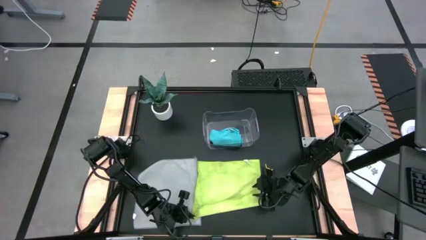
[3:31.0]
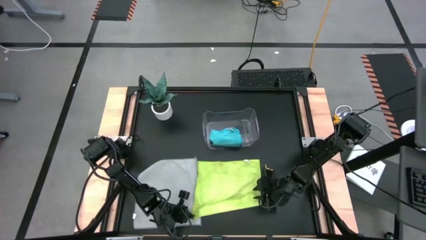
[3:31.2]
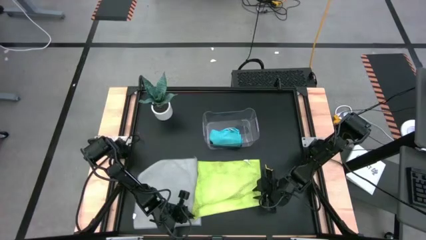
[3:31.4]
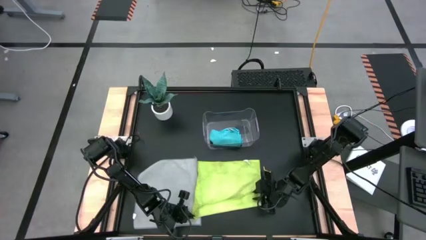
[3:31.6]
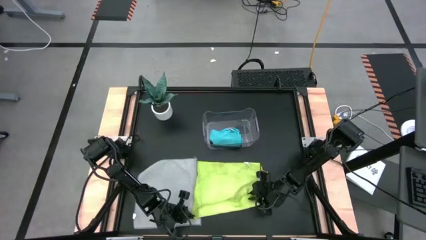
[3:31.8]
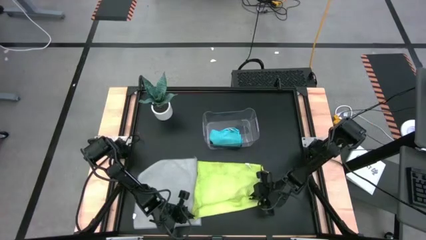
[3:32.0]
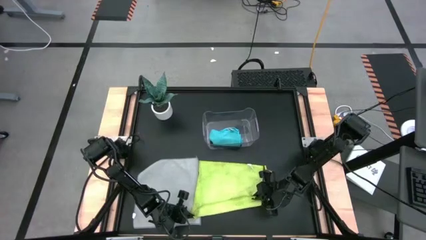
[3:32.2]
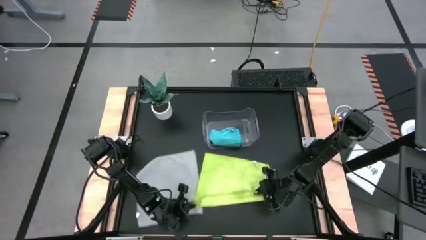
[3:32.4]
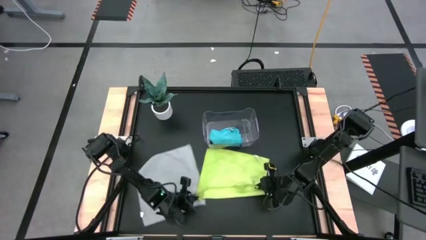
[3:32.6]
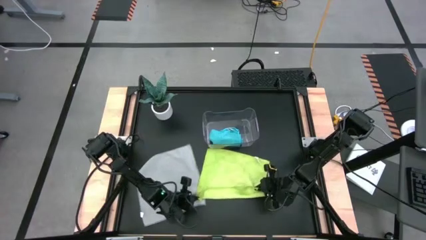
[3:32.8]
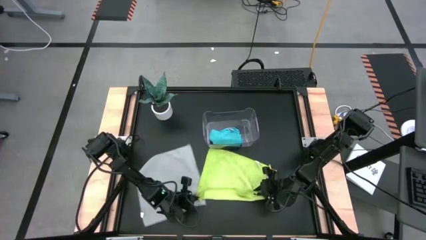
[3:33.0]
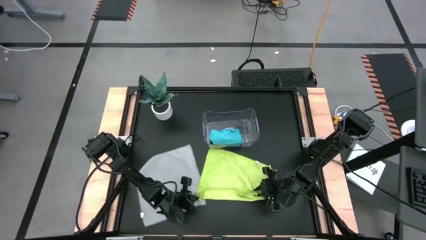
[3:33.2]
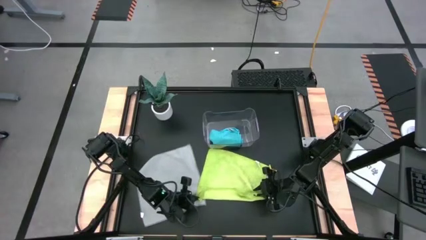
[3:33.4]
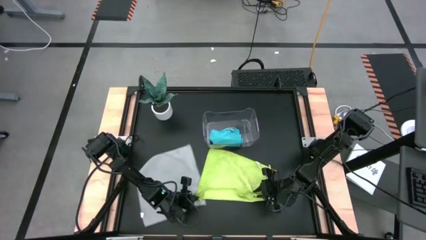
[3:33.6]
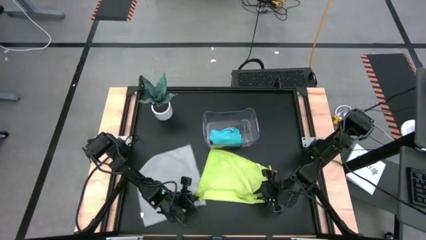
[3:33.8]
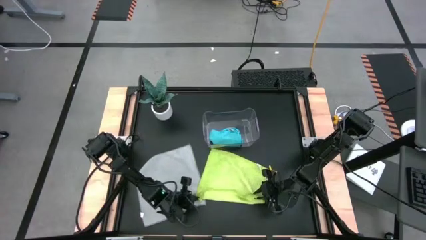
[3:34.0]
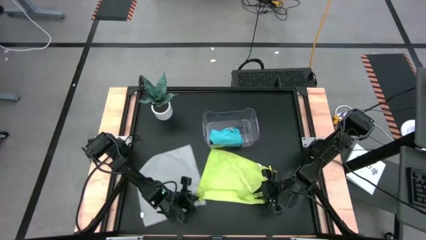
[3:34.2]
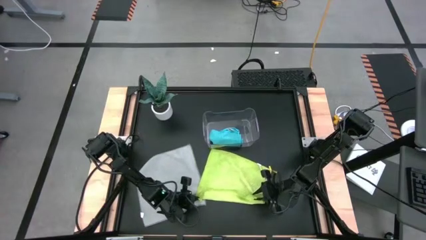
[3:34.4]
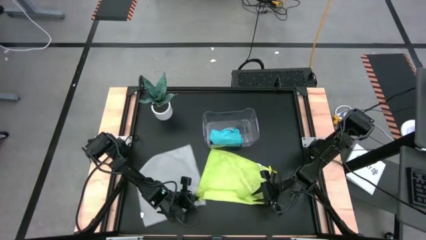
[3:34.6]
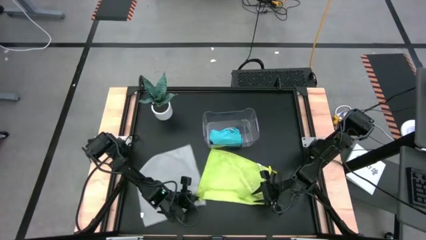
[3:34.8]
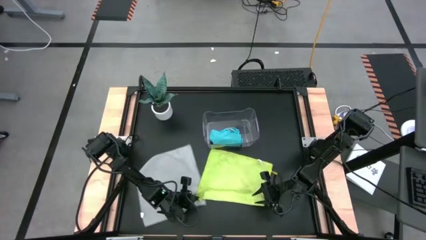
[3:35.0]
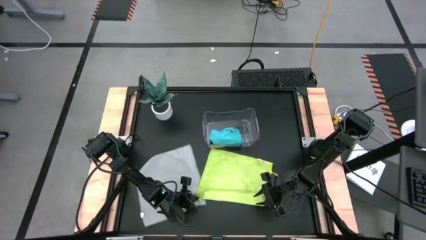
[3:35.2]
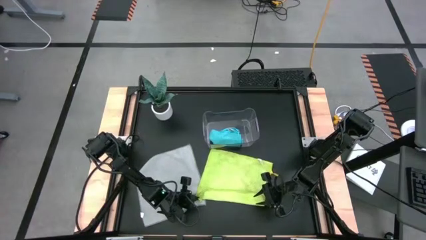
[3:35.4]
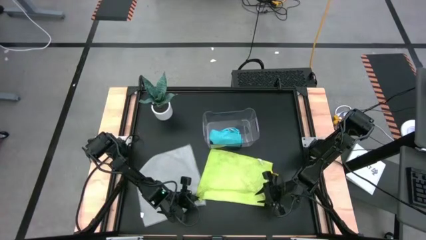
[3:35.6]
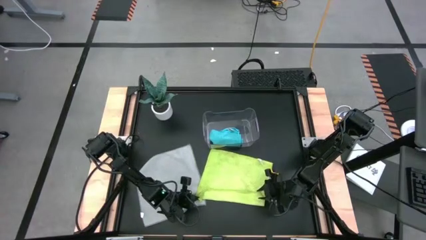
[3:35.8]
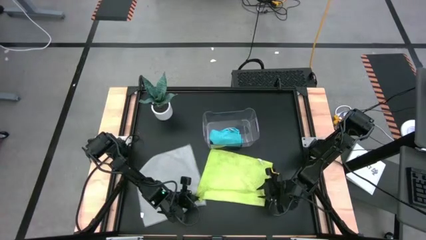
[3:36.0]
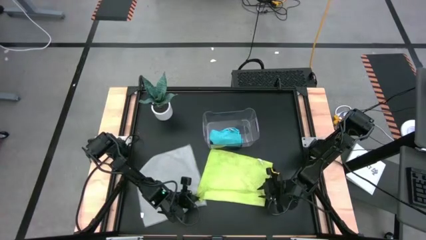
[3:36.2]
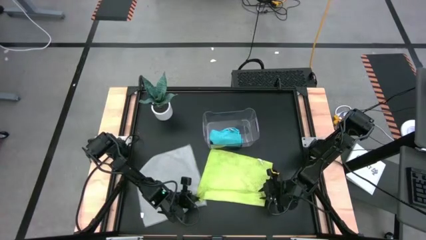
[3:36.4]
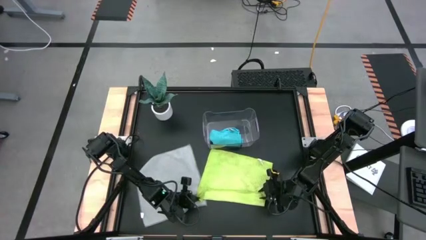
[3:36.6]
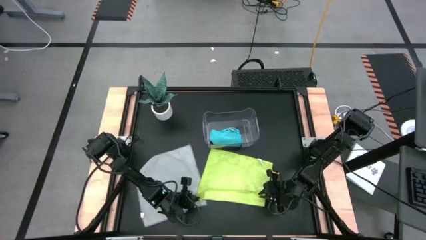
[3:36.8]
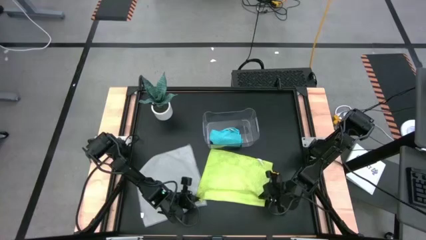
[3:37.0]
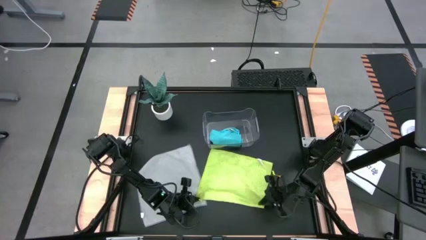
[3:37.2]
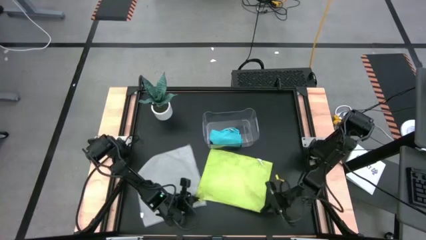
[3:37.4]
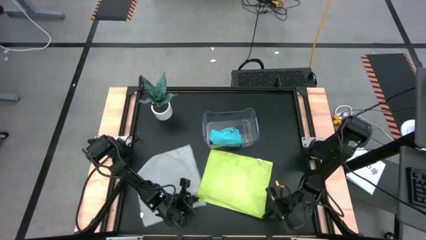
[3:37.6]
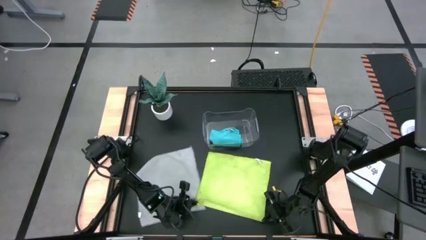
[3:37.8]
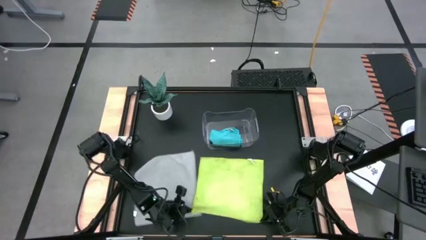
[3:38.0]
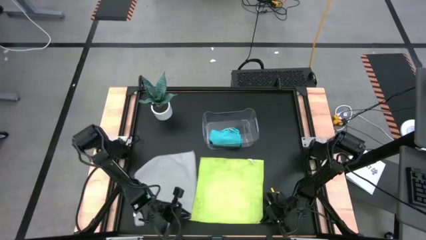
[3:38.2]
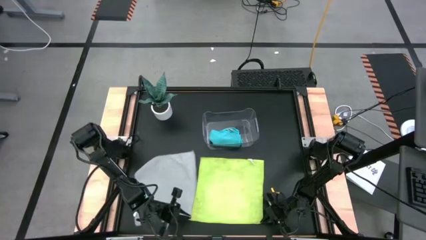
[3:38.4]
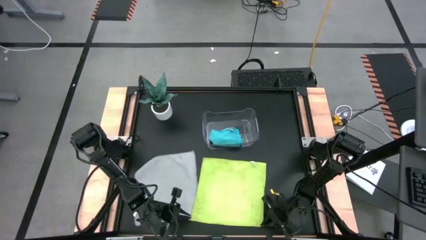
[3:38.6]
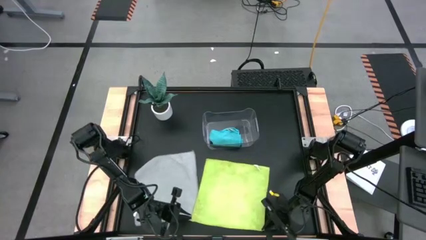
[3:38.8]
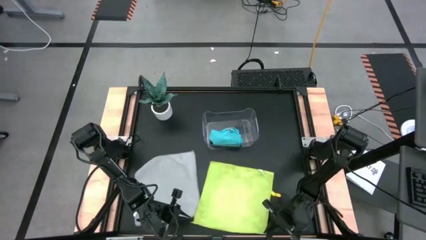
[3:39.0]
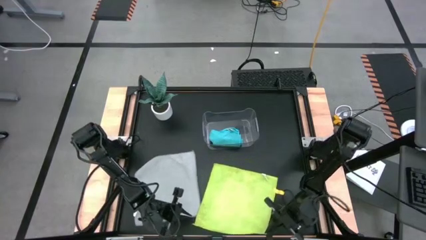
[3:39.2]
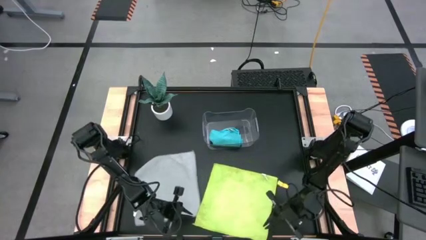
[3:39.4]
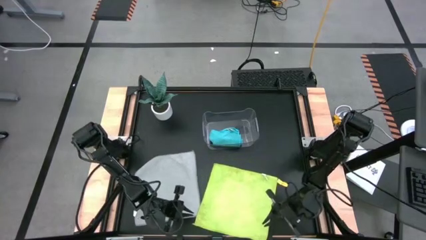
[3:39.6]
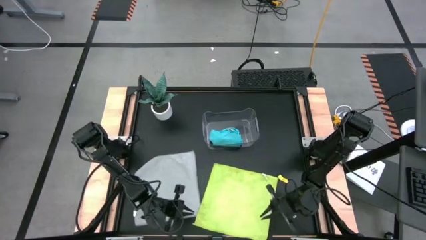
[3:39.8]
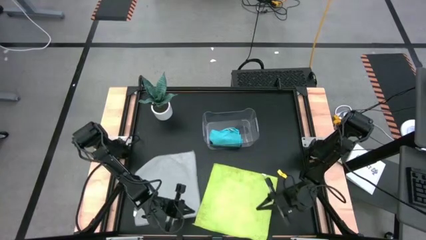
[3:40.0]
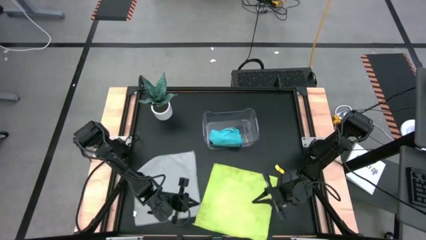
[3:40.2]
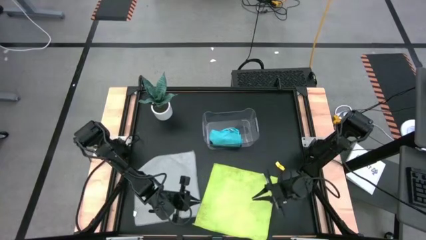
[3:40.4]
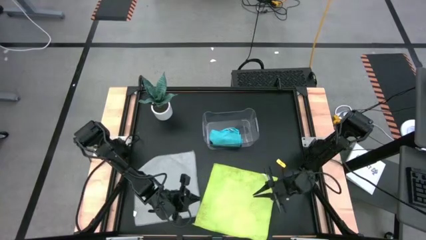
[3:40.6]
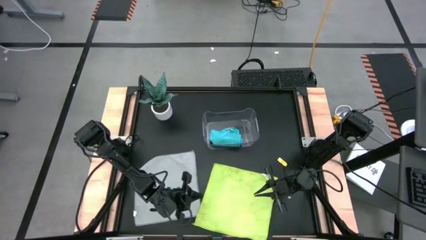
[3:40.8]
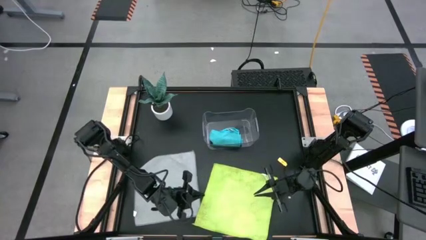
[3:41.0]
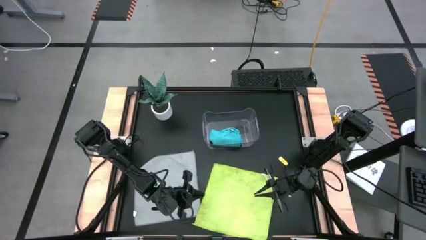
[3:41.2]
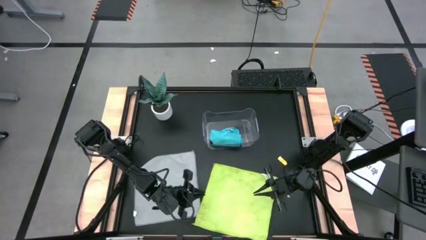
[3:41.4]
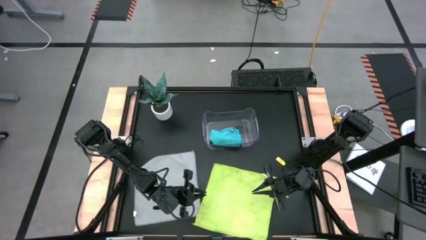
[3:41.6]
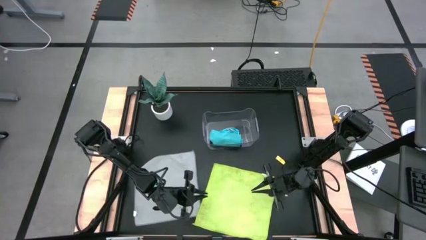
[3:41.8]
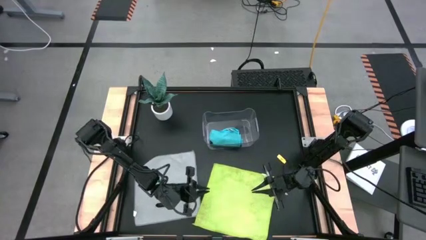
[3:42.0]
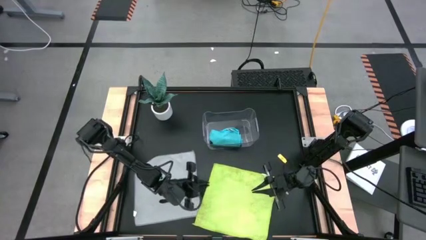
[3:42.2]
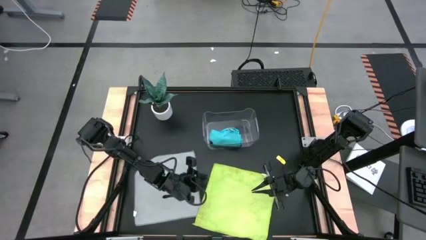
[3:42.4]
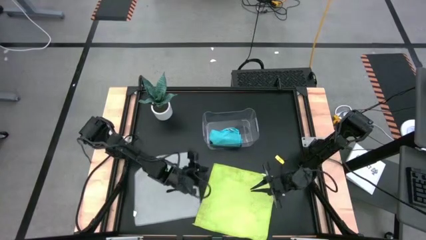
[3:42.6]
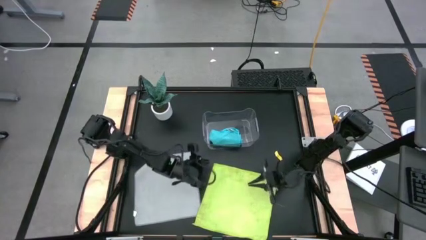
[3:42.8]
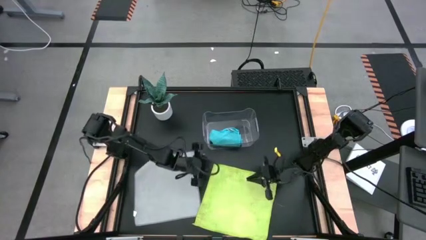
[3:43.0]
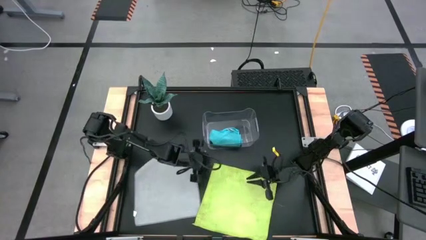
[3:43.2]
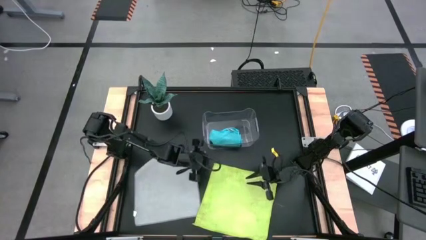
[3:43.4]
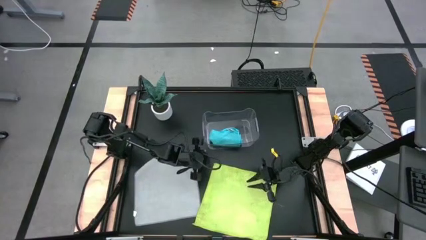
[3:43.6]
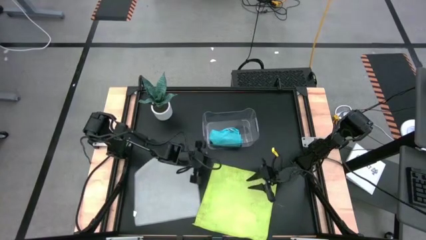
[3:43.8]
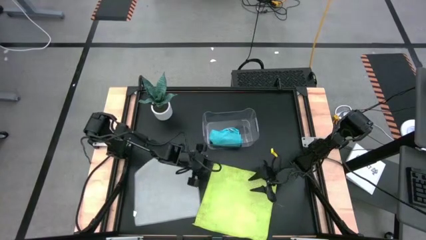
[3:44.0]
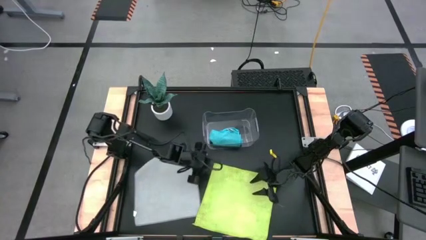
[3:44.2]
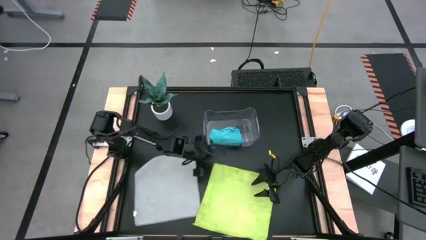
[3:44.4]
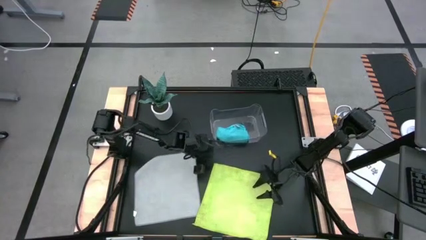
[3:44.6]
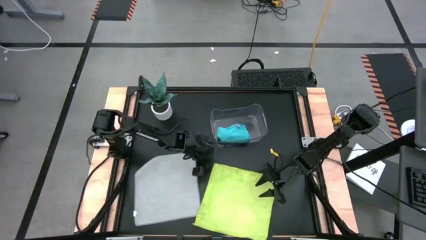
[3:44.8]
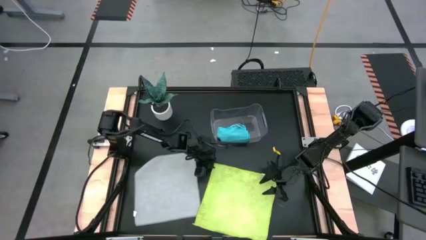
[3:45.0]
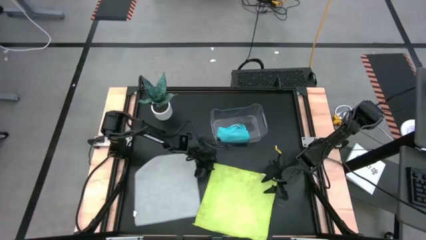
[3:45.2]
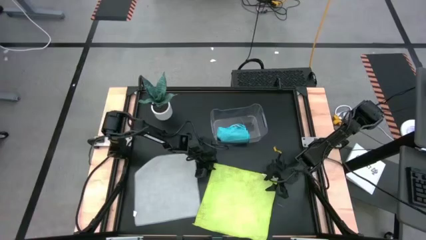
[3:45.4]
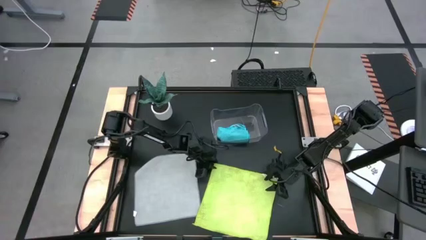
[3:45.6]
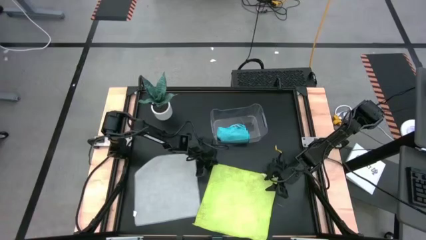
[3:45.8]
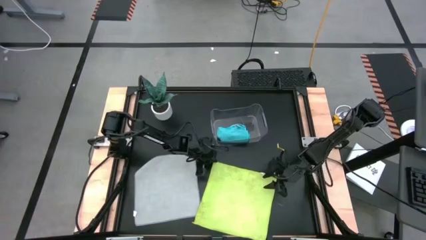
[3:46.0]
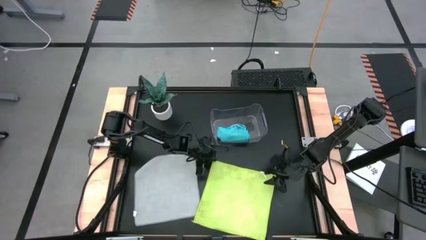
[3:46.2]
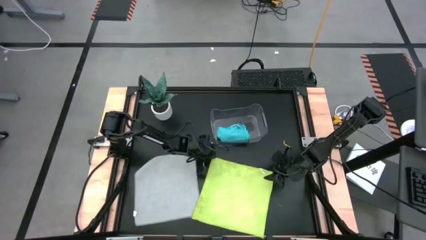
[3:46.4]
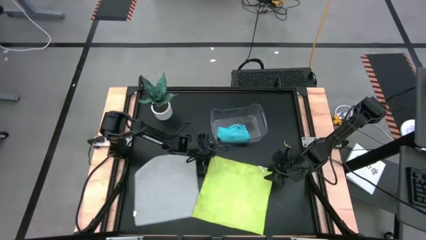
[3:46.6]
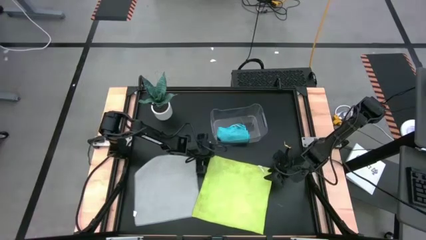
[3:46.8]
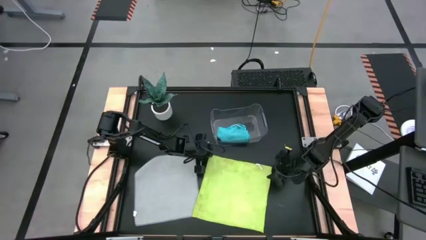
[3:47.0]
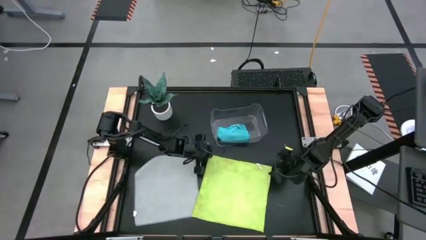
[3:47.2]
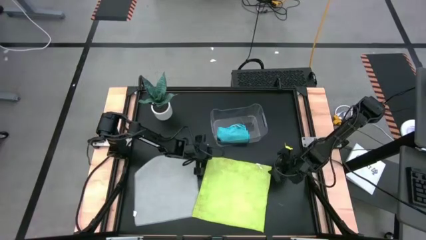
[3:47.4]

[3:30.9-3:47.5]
Task: Fold microfiber towels
Fold the green towel
